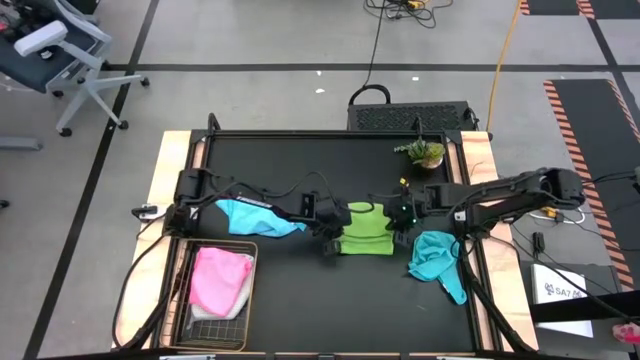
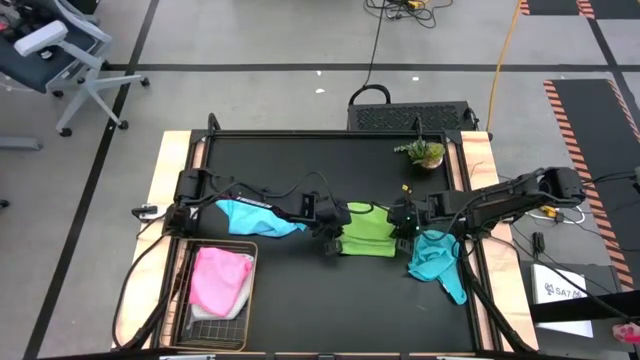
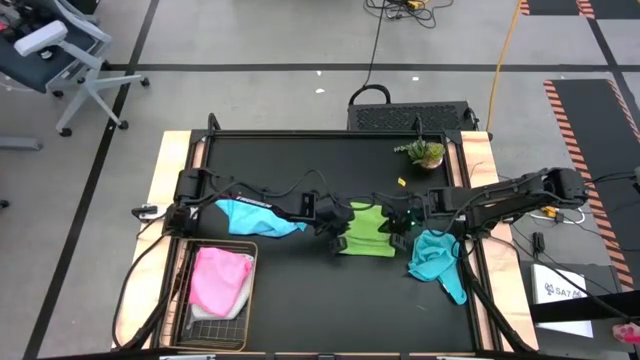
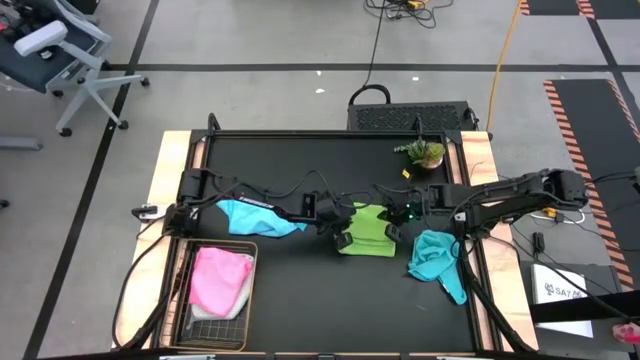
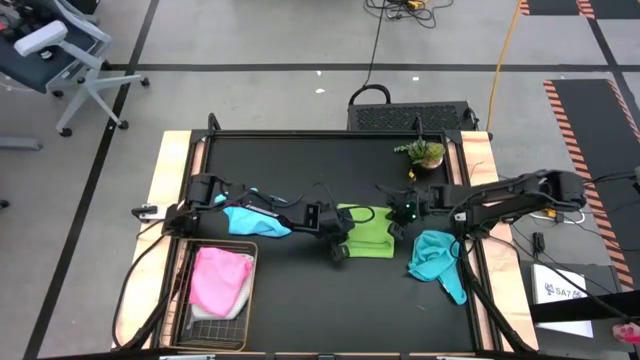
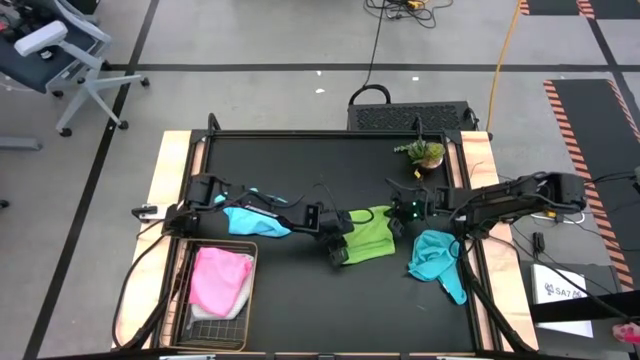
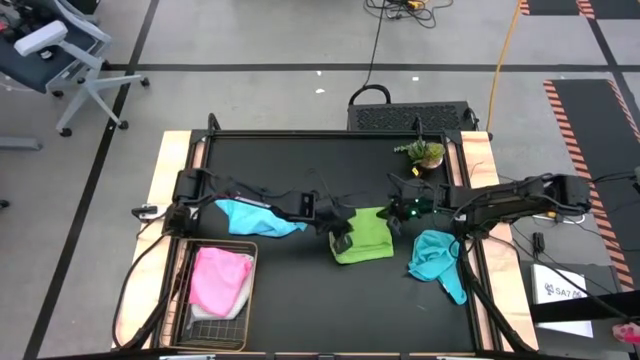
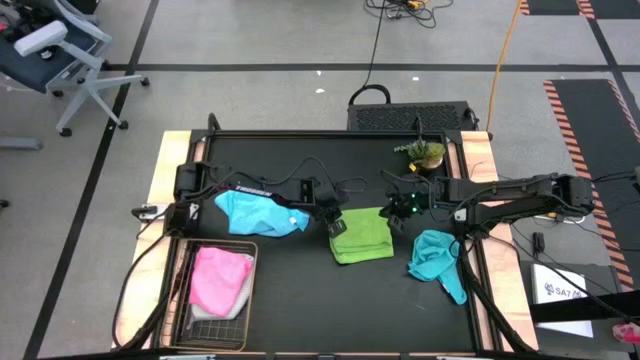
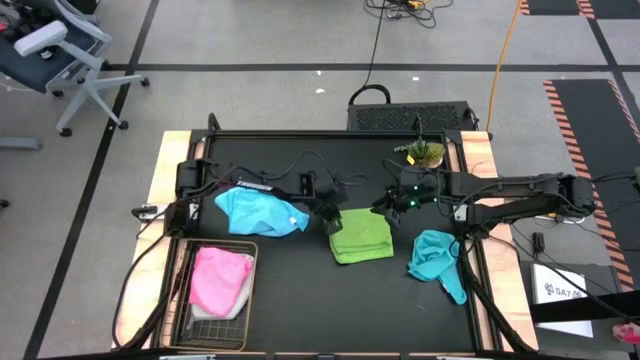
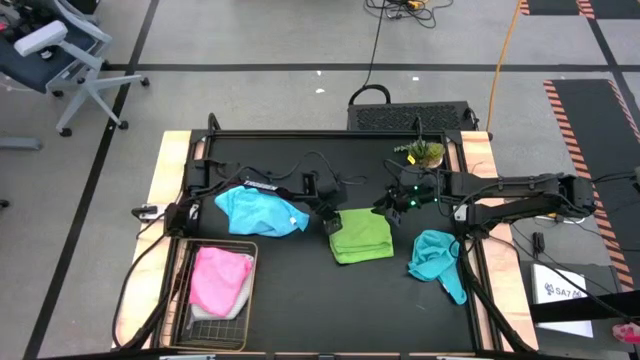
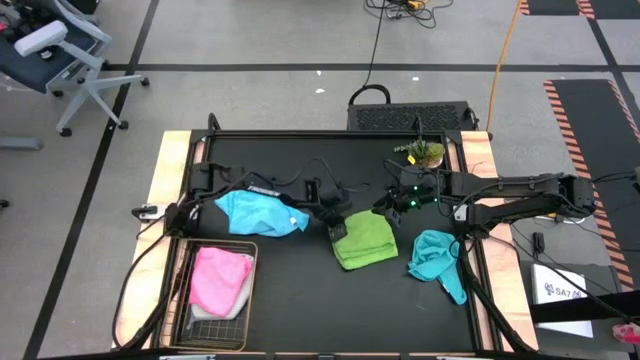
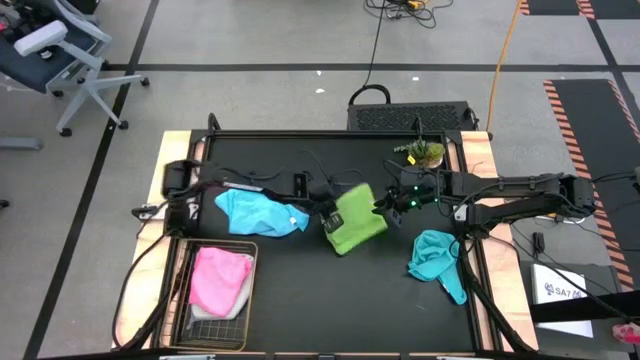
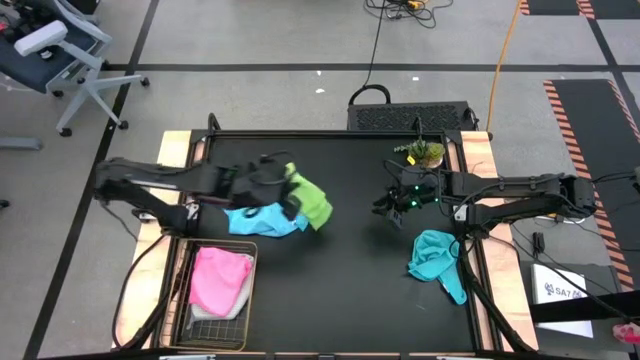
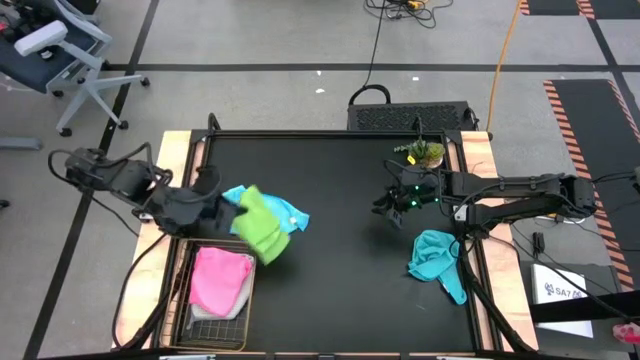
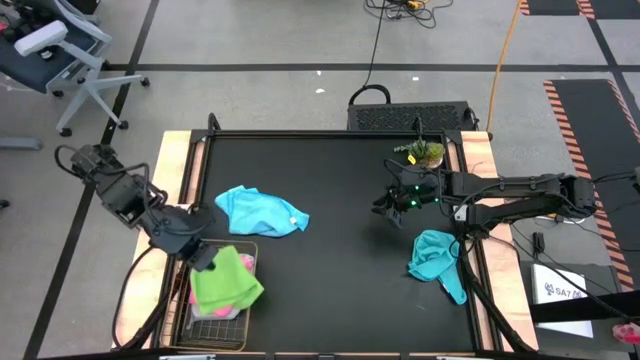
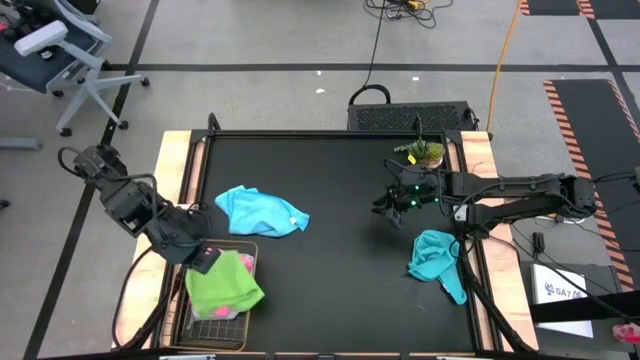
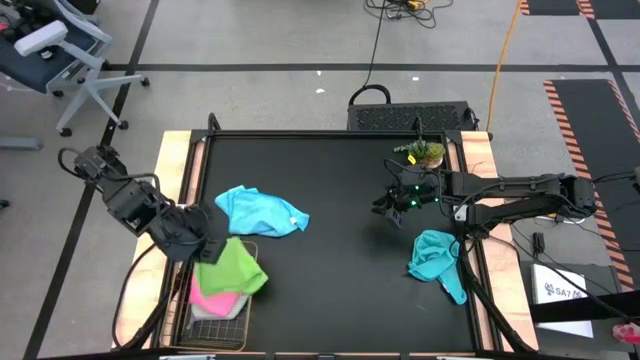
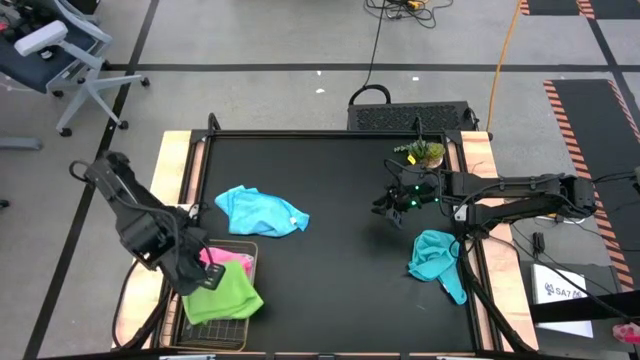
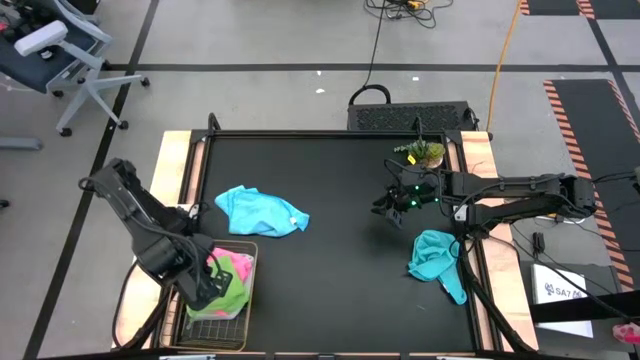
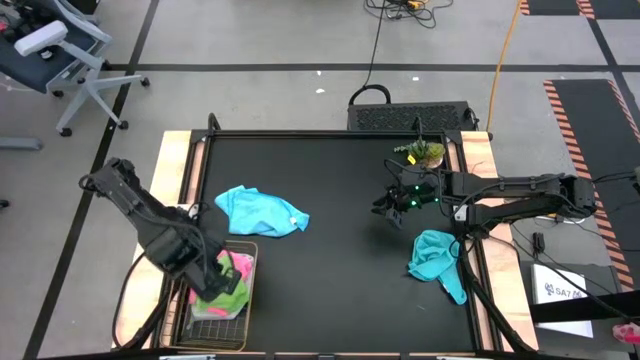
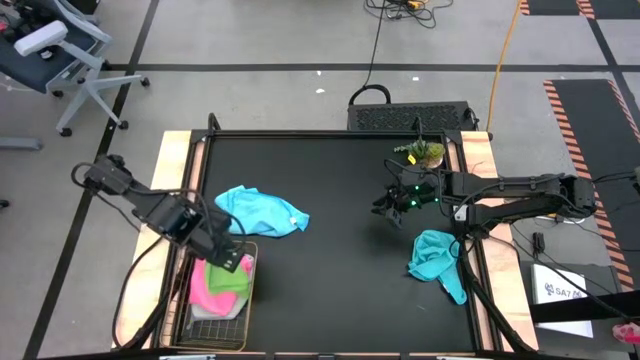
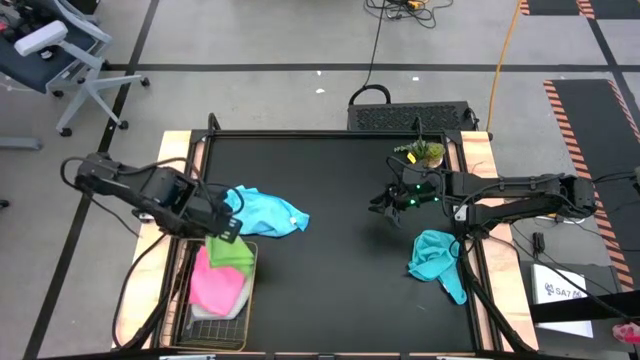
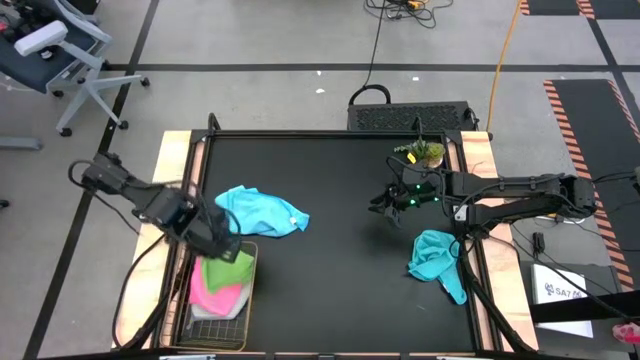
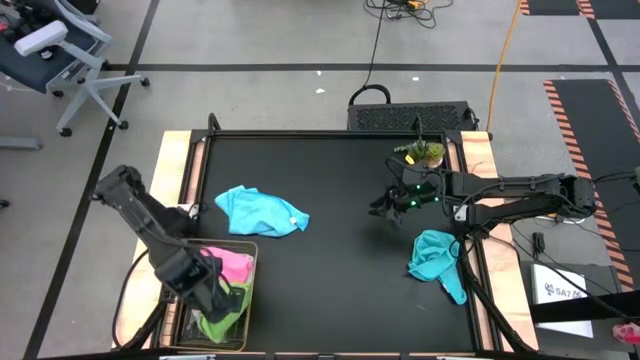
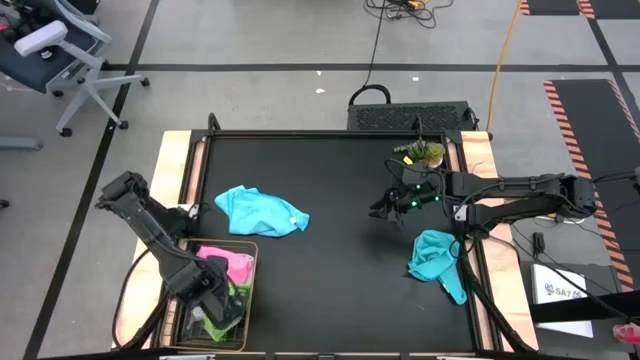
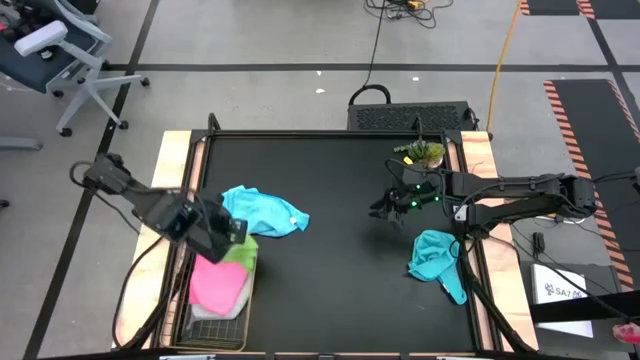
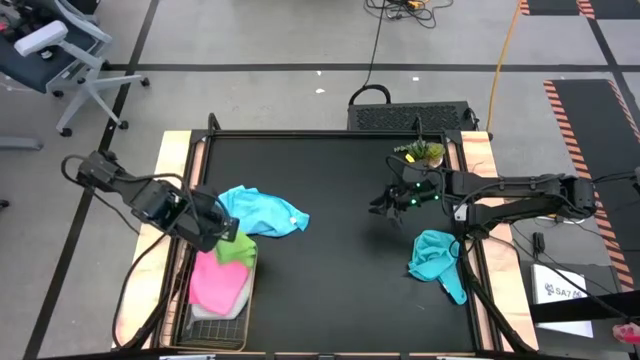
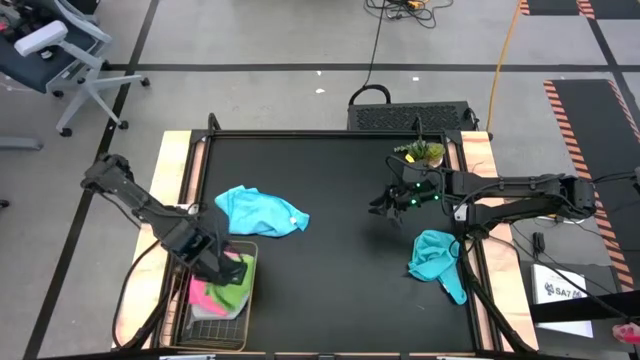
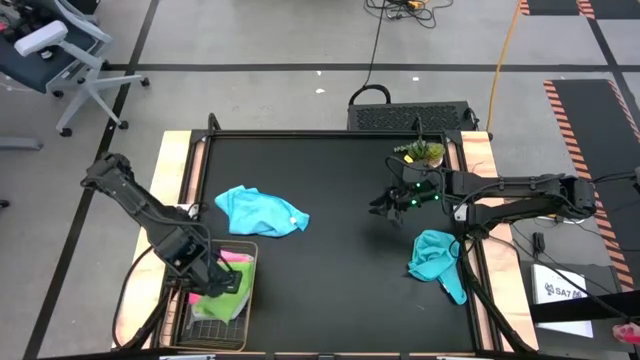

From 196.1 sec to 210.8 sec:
Task: Fold microfiber towels
Put the folded green microfiber cloth into the wire basket

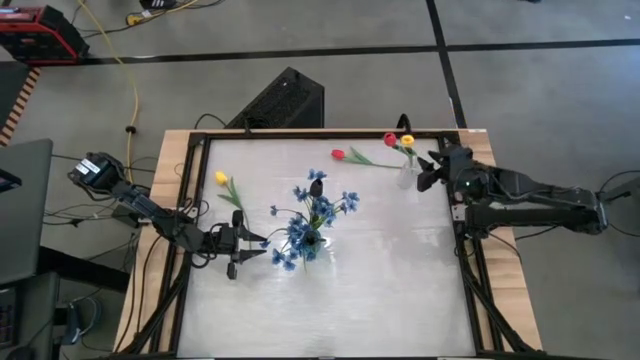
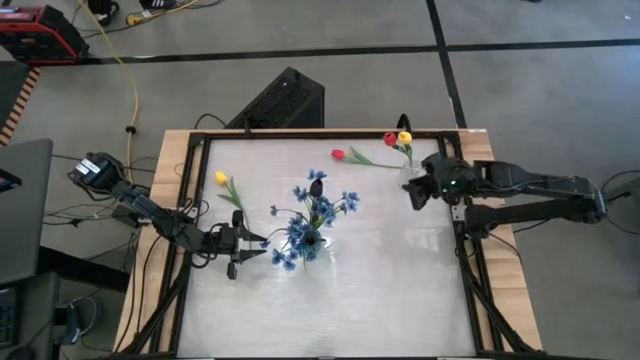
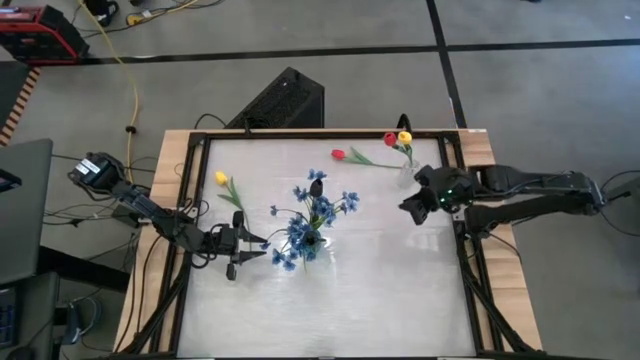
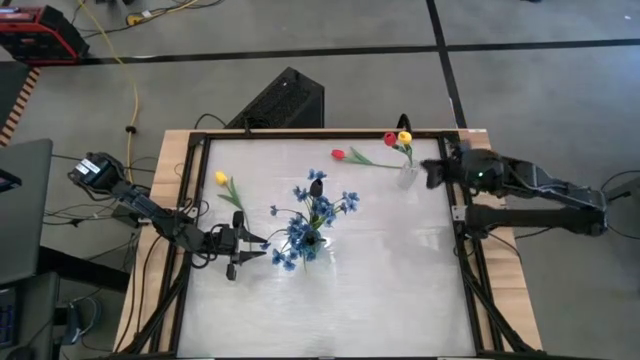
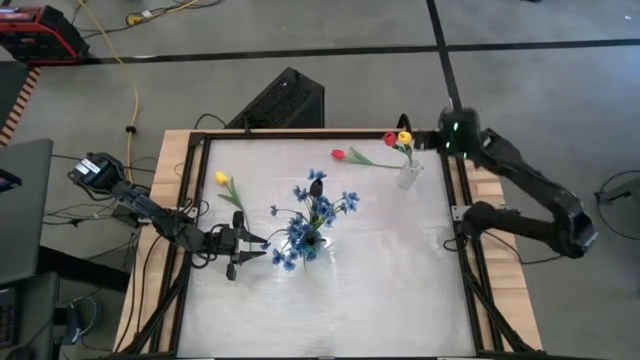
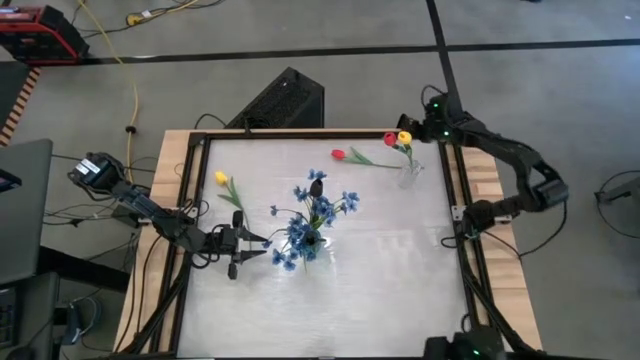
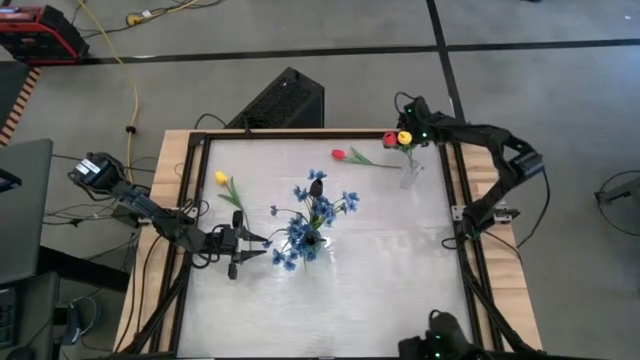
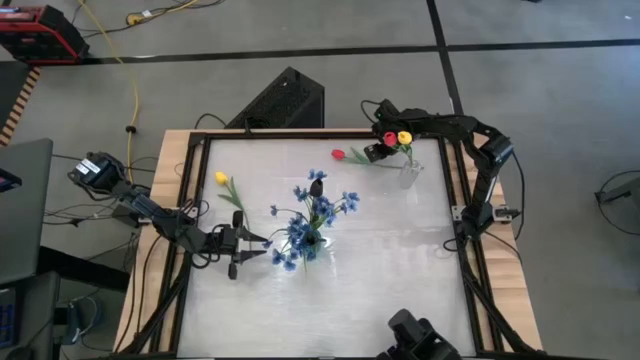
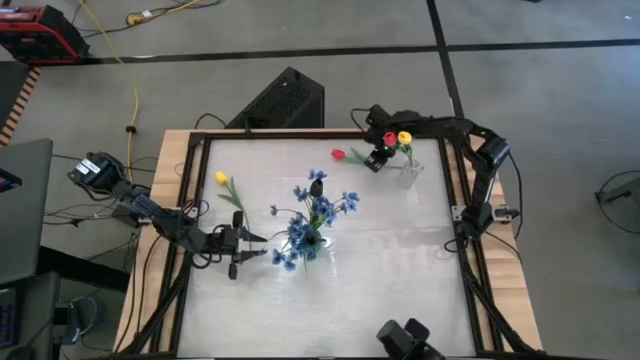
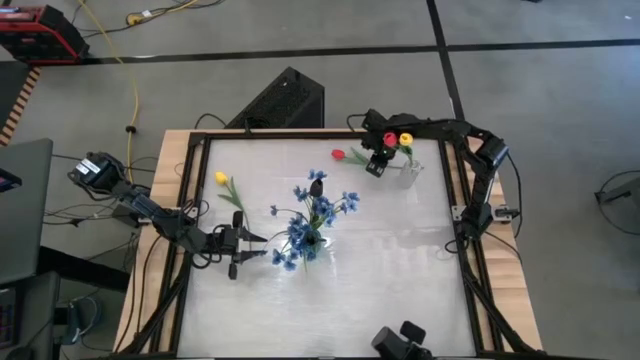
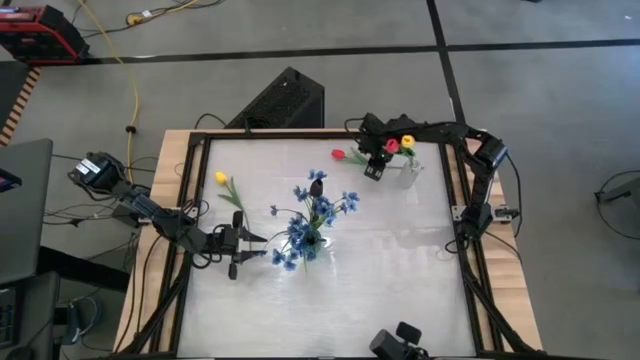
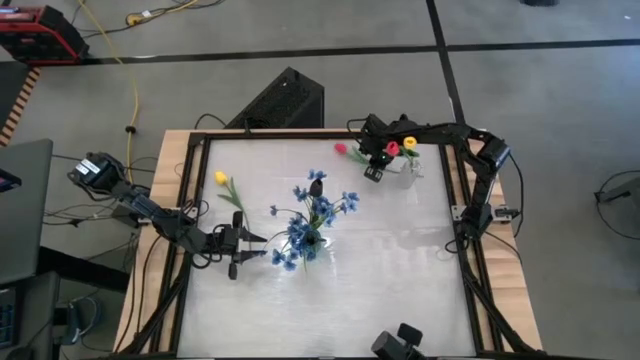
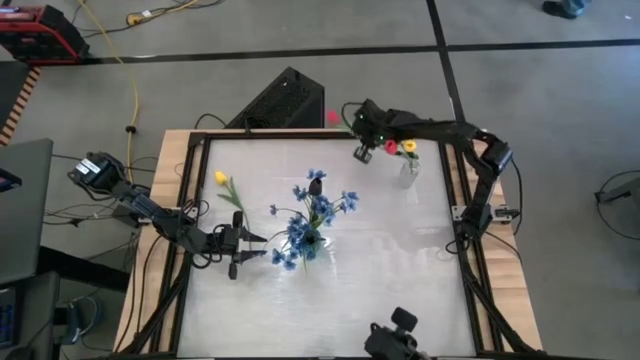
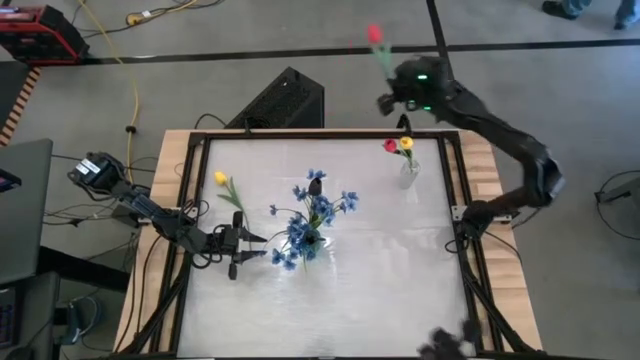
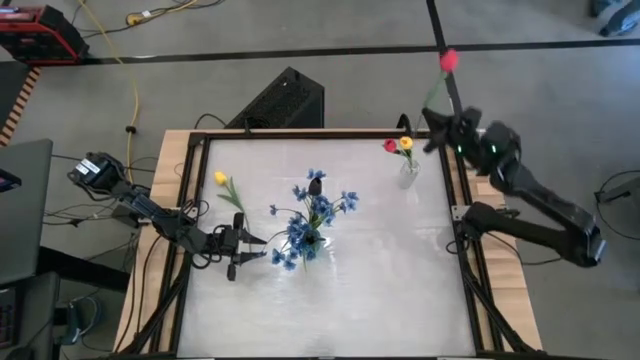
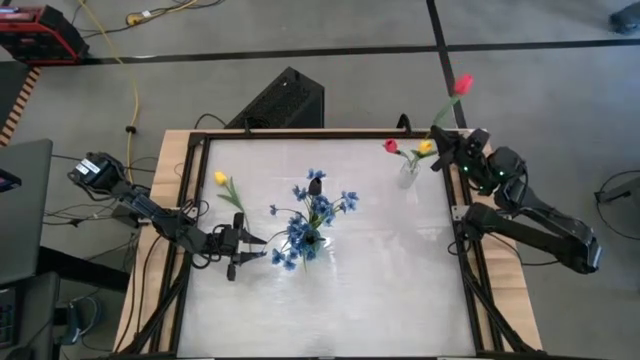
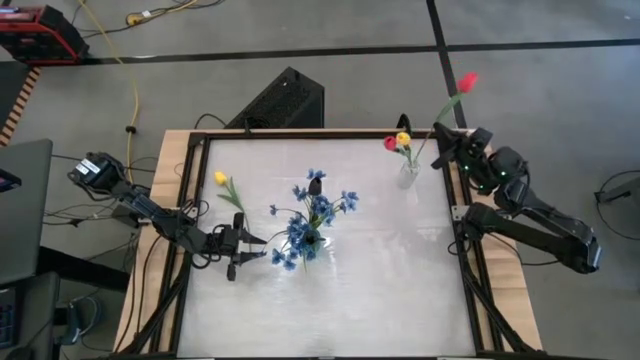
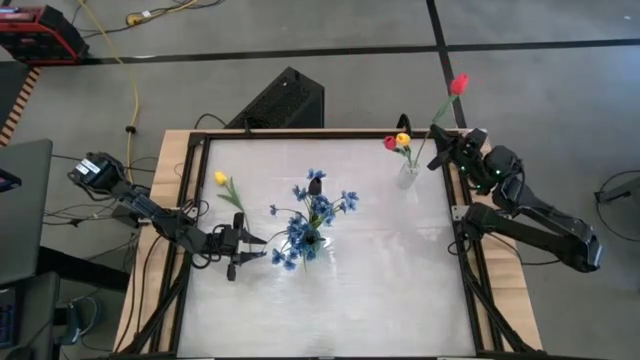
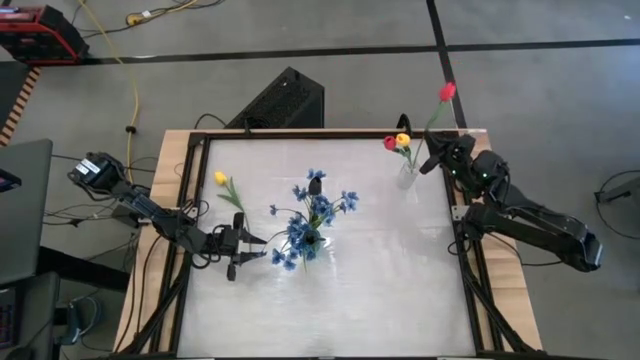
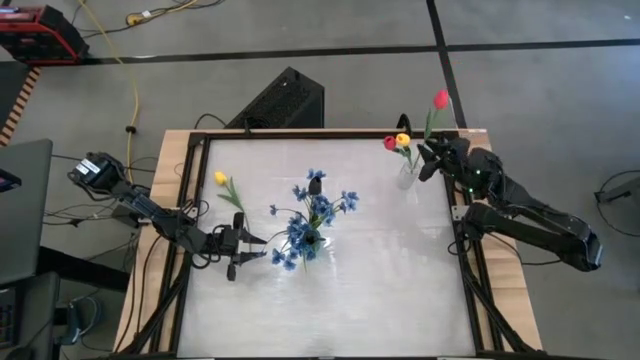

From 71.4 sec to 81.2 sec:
Task: Sort flowers into vase by color
Put the red tulip into the transparent vase
